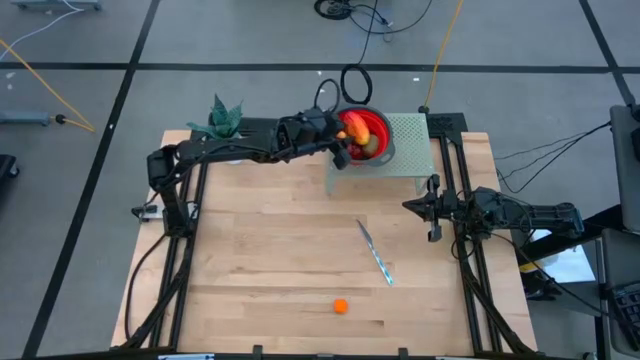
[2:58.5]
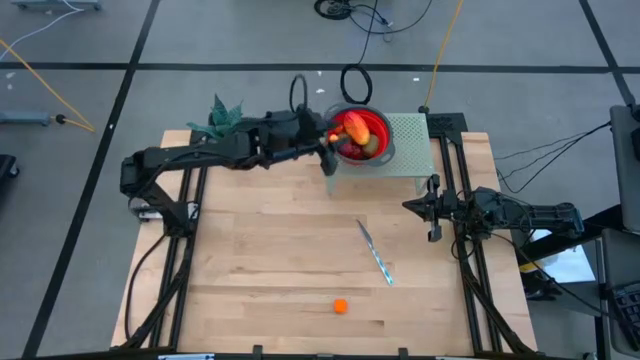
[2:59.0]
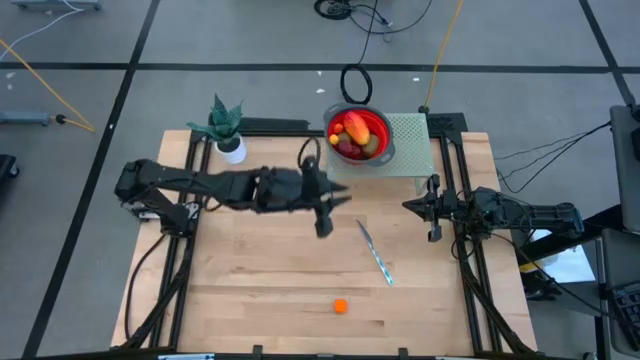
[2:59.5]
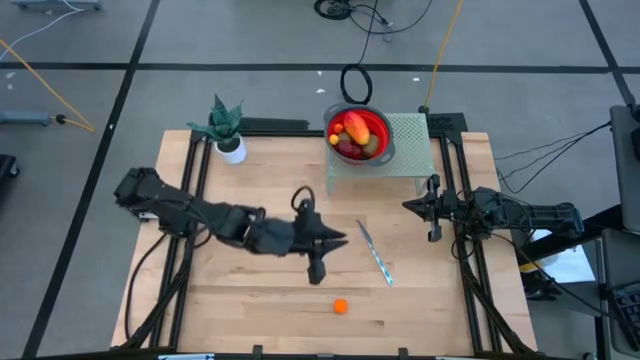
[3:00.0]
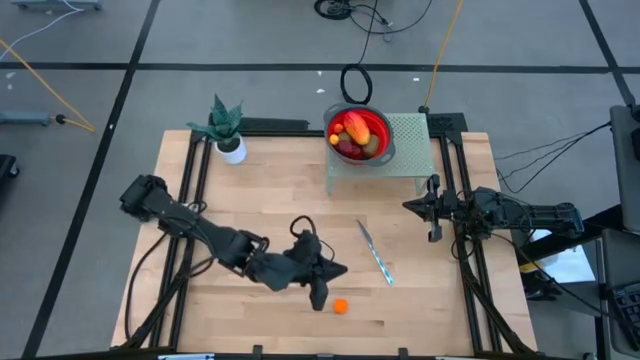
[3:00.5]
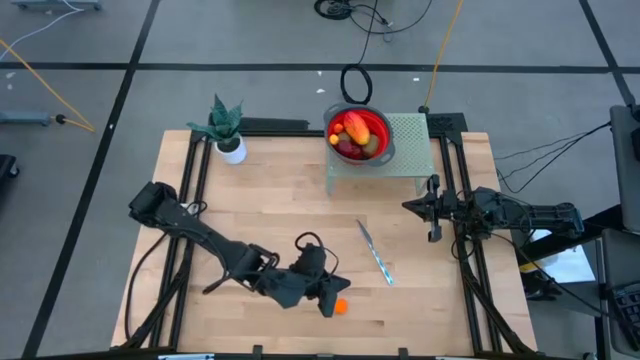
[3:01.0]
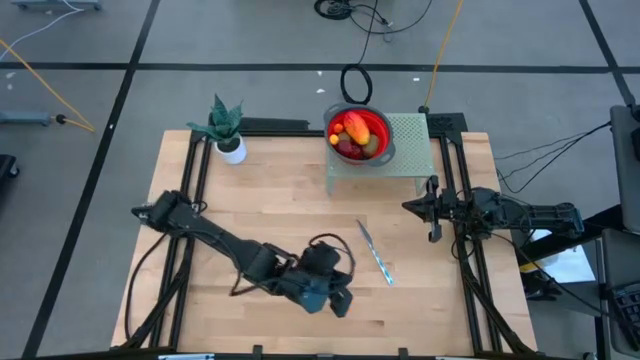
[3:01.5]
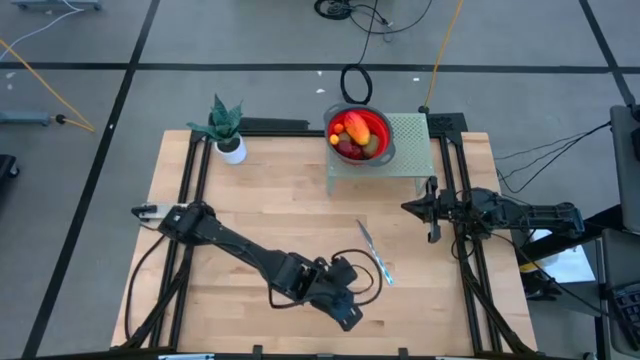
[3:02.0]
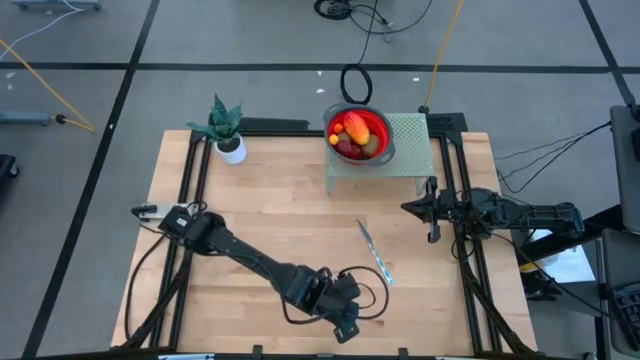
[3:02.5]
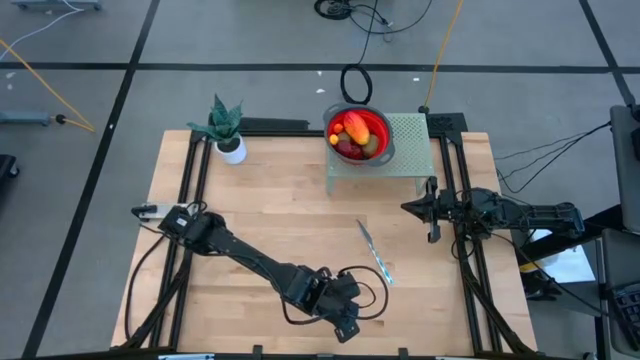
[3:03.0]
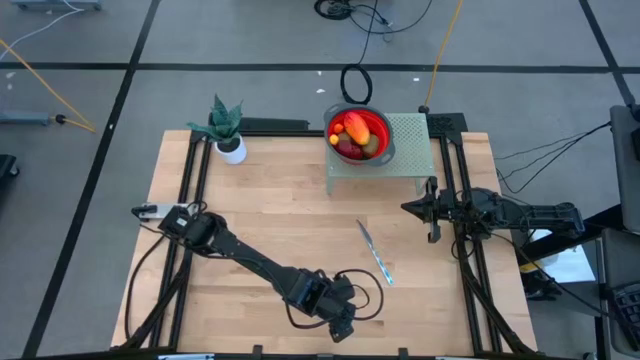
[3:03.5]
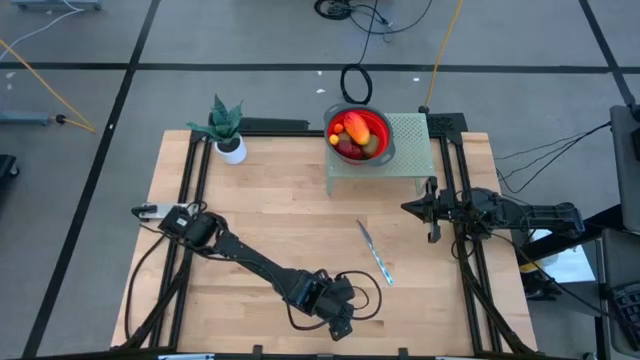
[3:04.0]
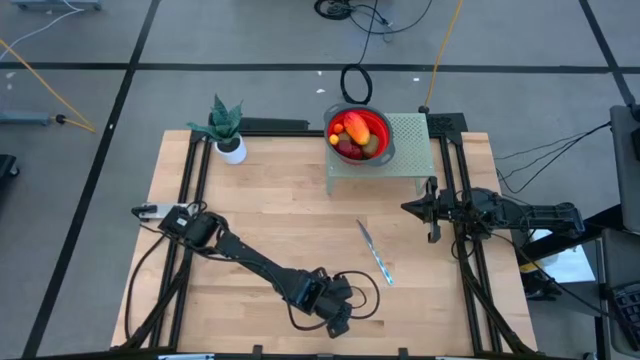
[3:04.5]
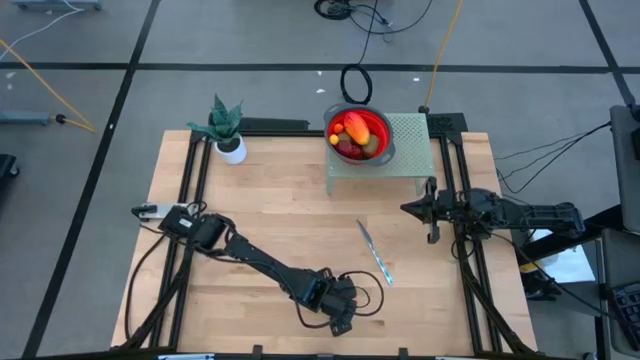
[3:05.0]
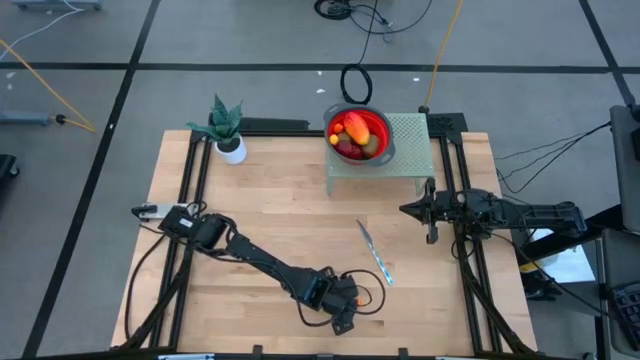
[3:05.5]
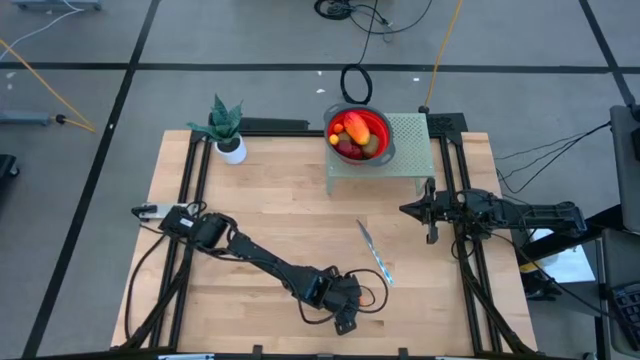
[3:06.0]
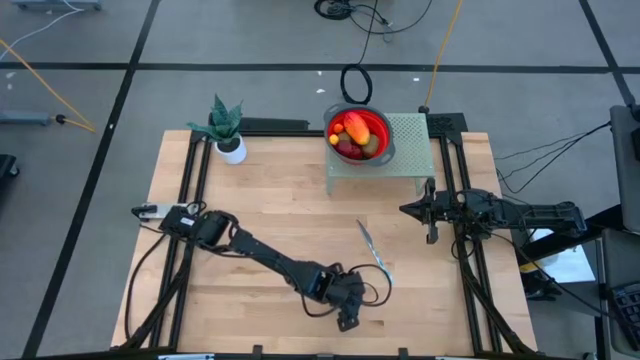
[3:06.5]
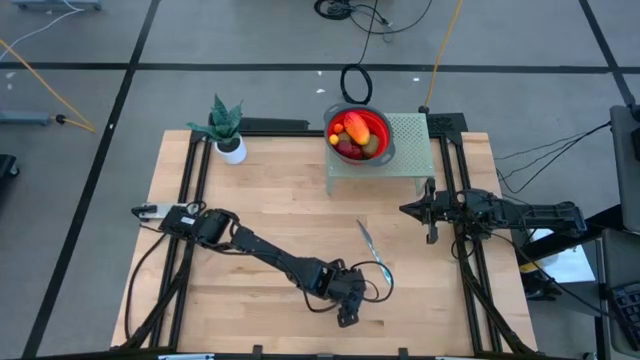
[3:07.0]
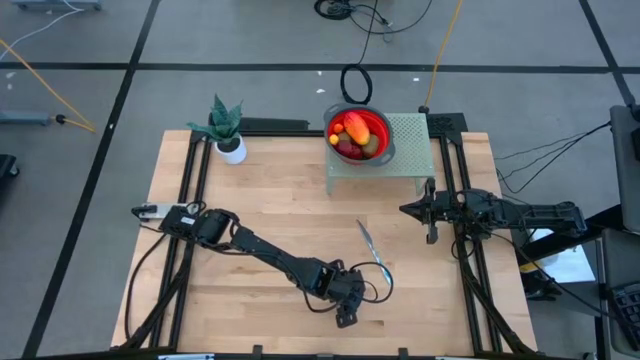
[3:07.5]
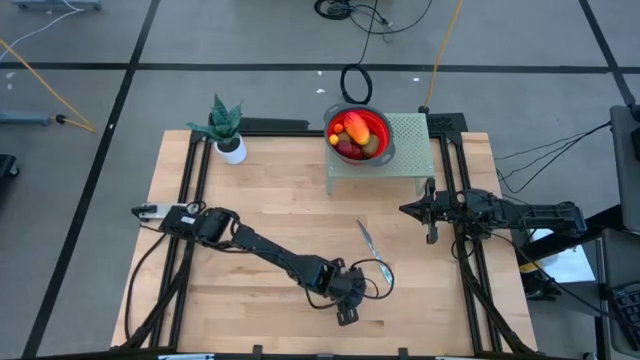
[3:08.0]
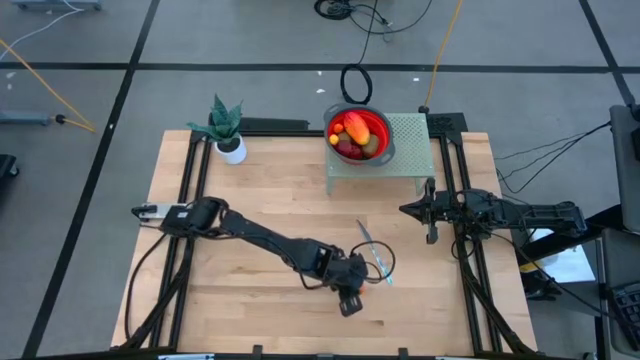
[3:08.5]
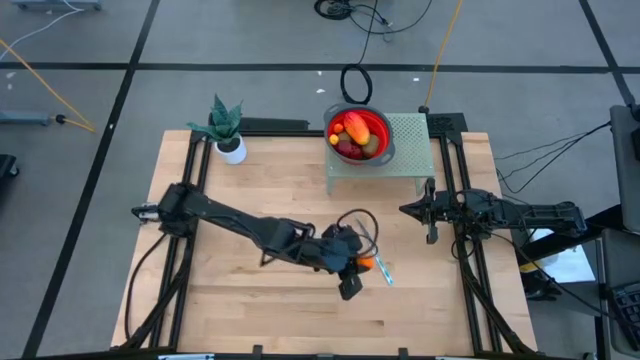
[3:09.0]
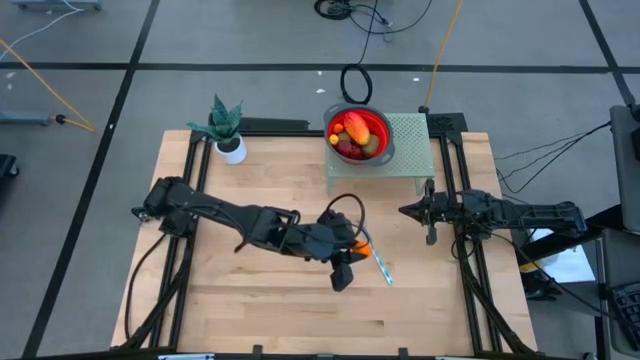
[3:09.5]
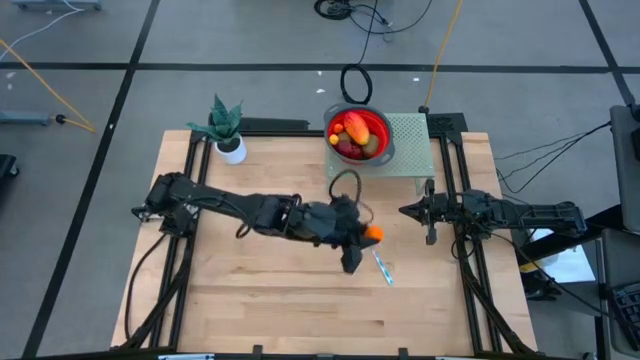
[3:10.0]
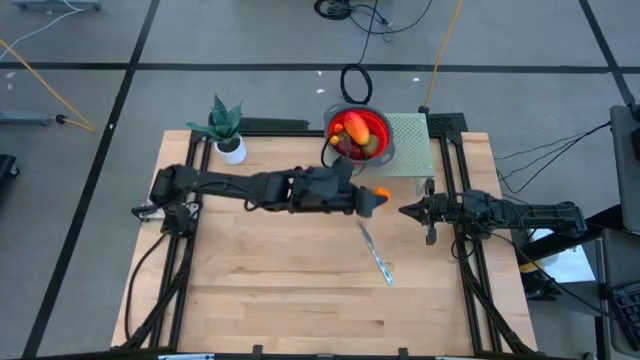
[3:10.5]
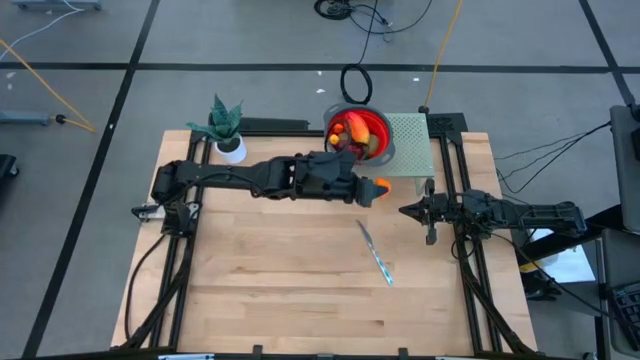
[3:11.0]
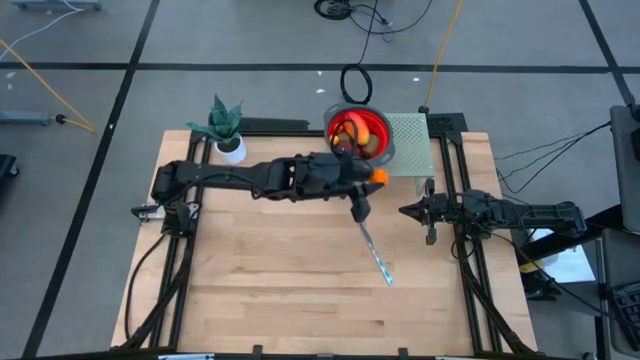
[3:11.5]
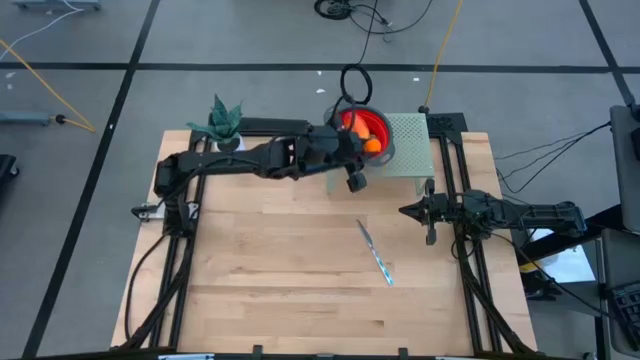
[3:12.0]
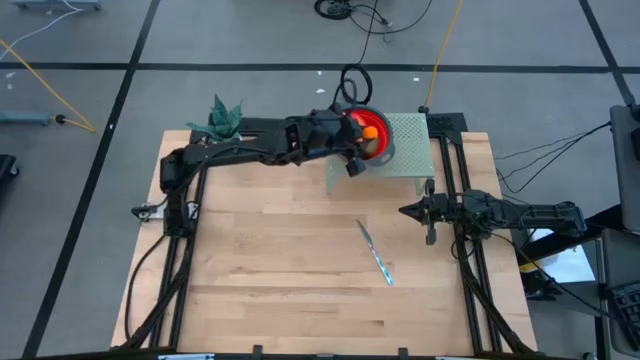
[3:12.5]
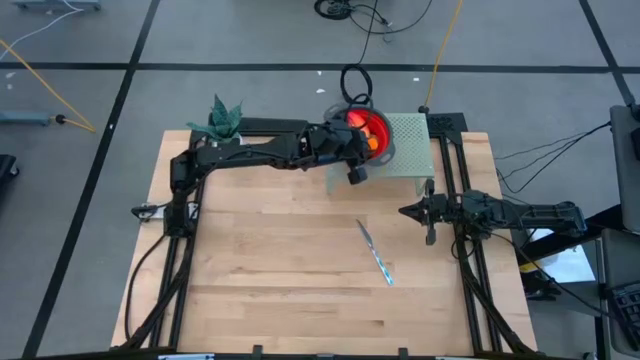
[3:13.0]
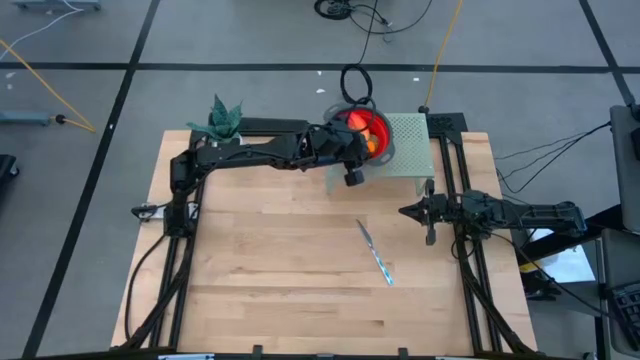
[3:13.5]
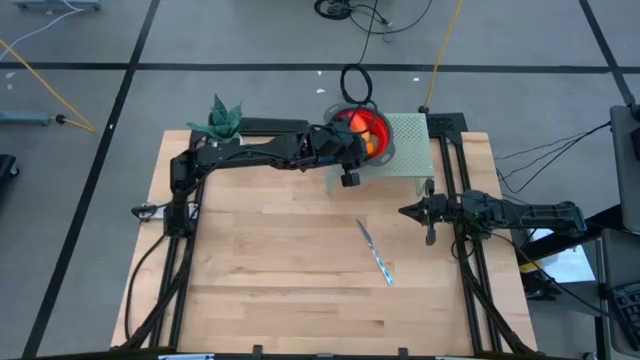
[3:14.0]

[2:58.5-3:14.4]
Task: Pick & Place Fruit
Put the orange tangerine into the red basket on the shelf

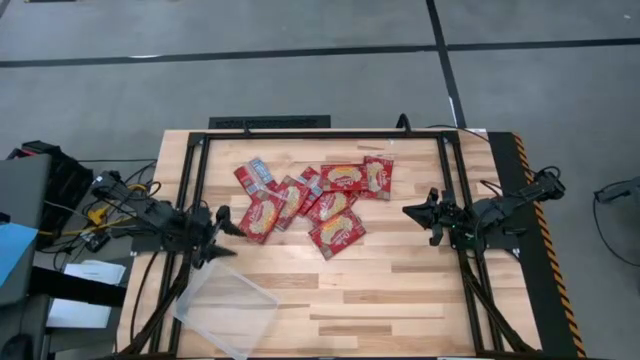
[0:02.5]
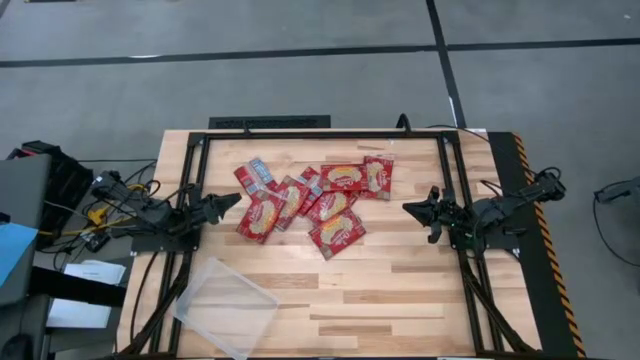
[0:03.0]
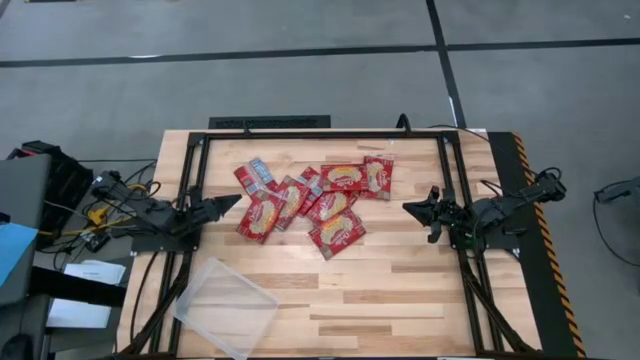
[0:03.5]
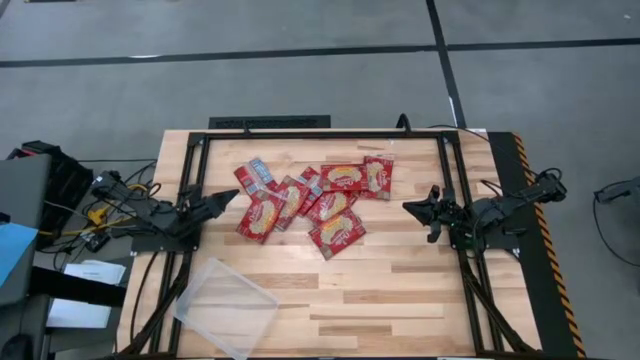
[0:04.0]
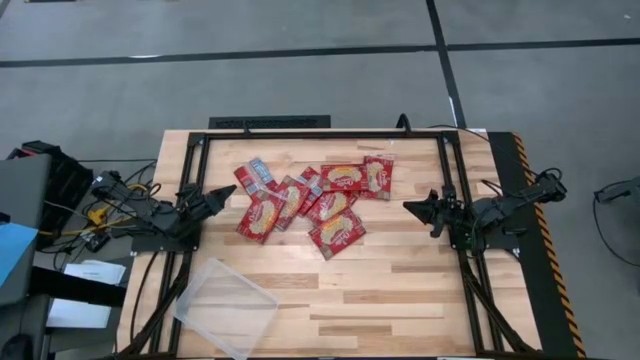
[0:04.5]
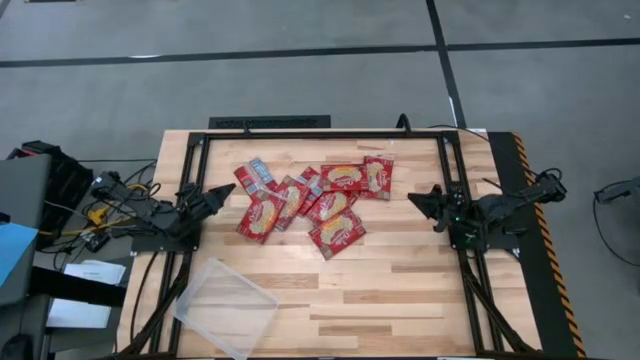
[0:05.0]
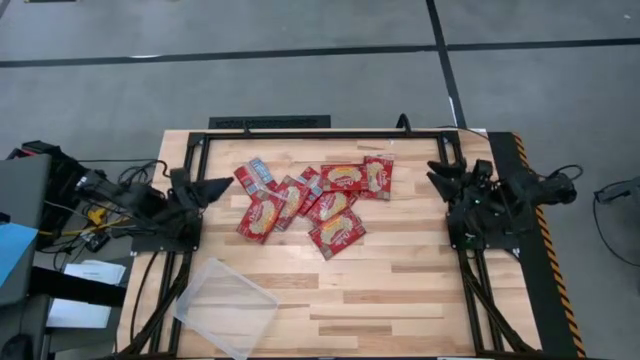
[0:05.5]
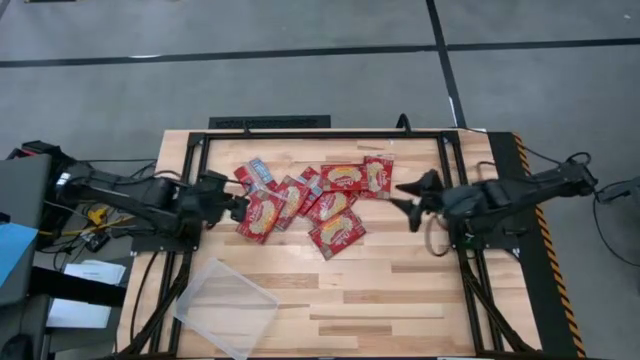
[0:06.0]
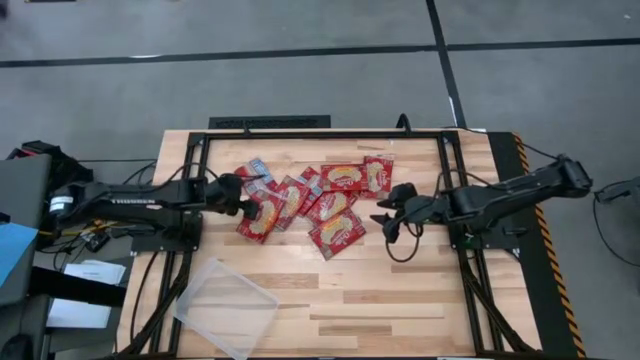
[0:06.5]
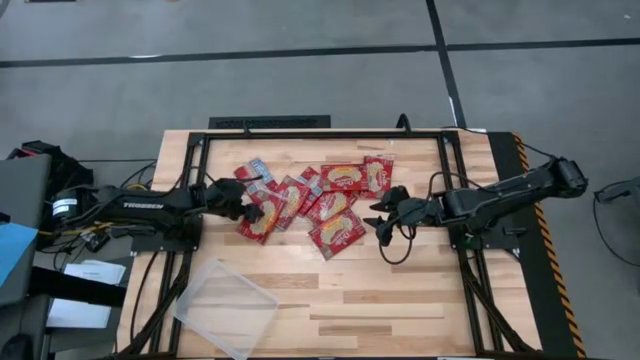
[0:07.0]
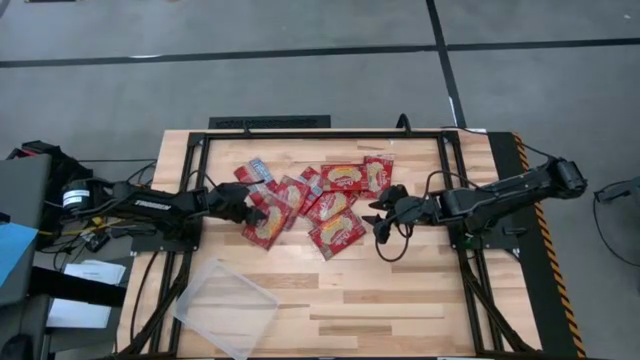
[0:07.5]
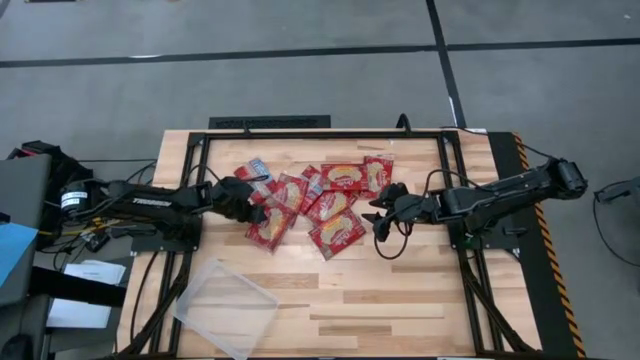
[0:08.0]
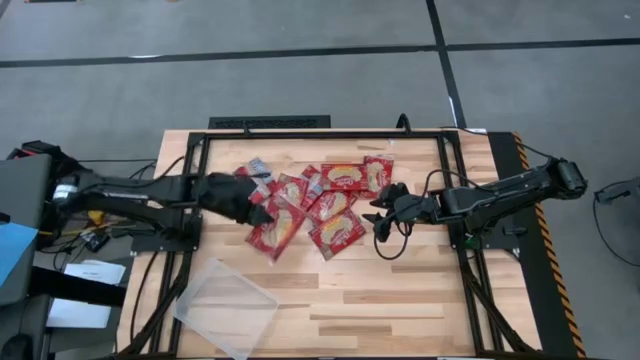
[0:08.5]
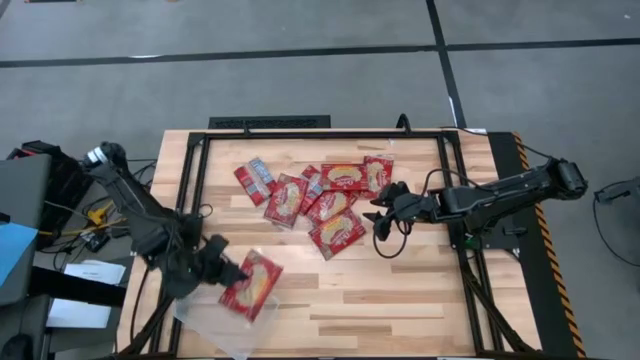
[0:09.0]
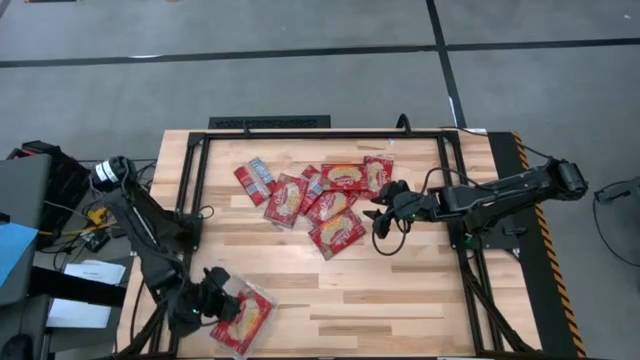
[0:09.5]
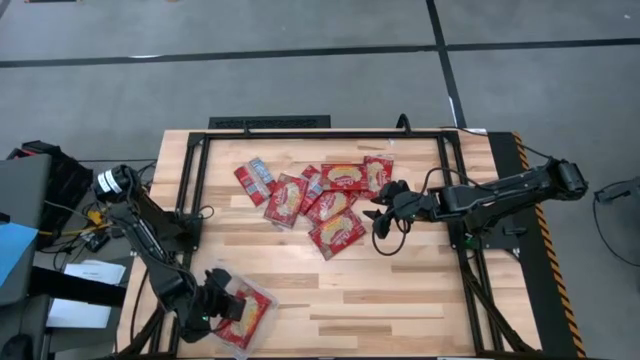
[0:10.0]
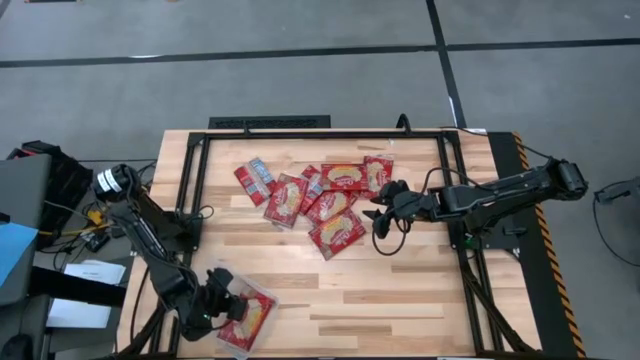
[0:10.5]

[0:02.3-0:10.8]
Task: Sort popcorn bags into baskets
Put the red popcorn bag into the transparent bin
